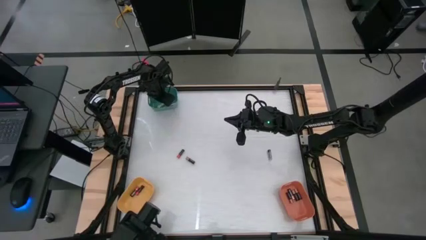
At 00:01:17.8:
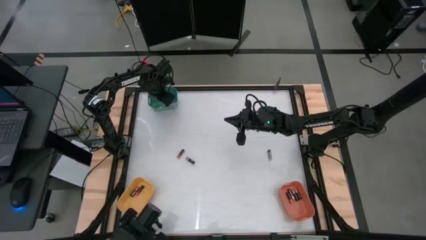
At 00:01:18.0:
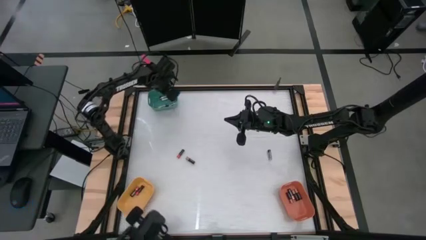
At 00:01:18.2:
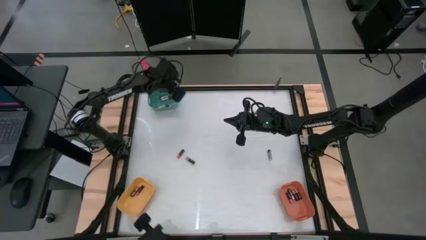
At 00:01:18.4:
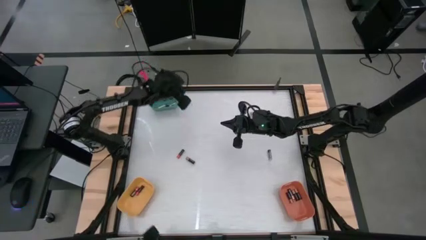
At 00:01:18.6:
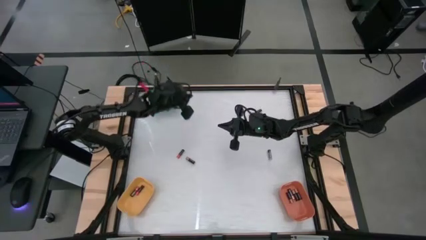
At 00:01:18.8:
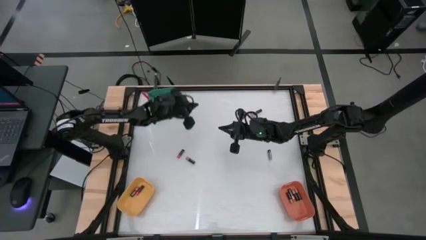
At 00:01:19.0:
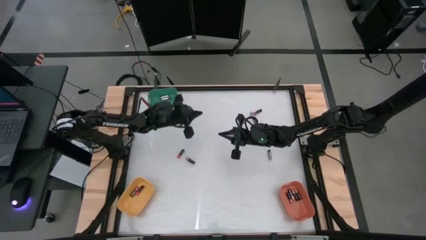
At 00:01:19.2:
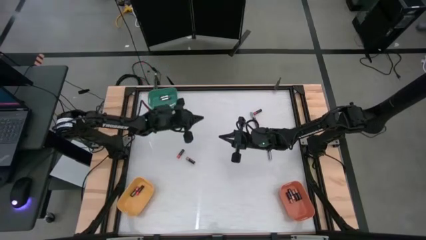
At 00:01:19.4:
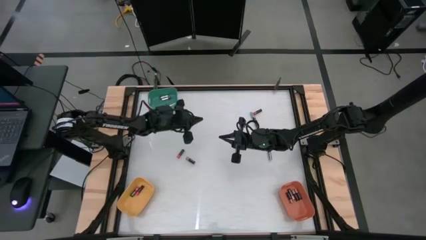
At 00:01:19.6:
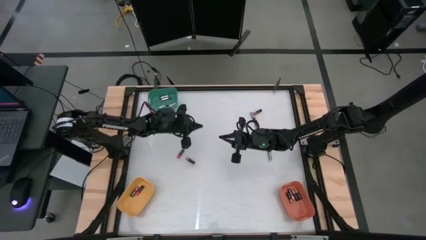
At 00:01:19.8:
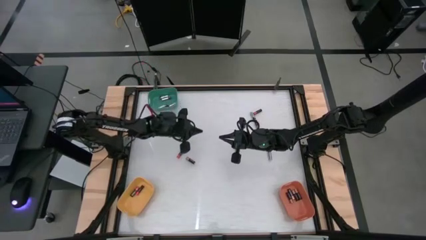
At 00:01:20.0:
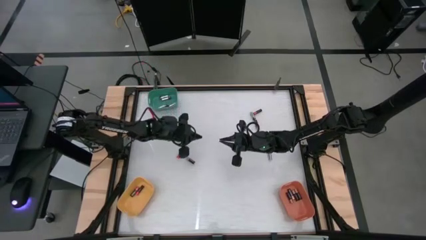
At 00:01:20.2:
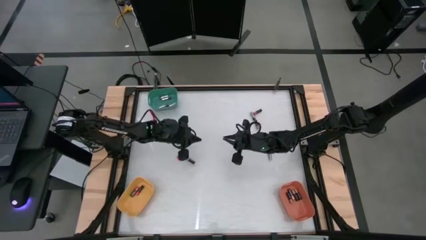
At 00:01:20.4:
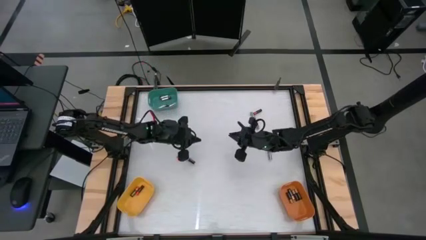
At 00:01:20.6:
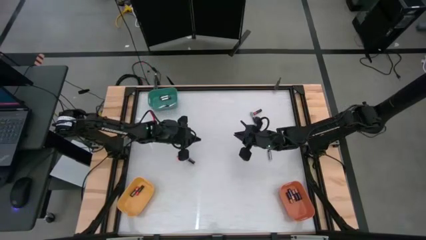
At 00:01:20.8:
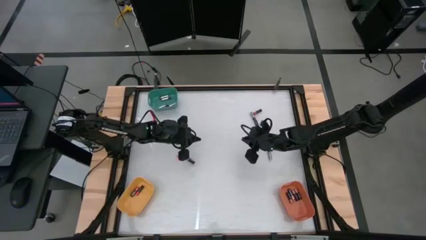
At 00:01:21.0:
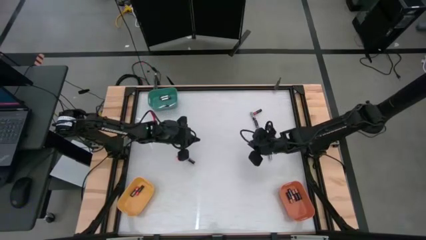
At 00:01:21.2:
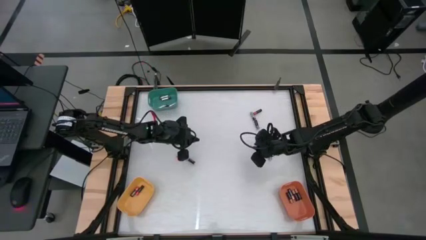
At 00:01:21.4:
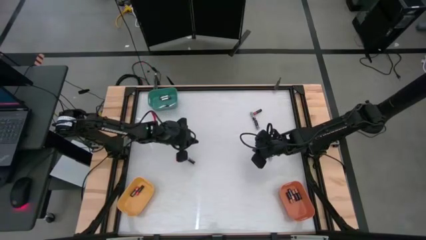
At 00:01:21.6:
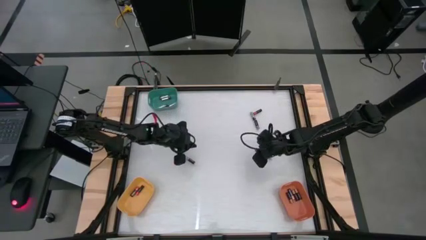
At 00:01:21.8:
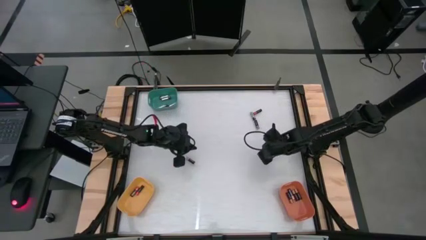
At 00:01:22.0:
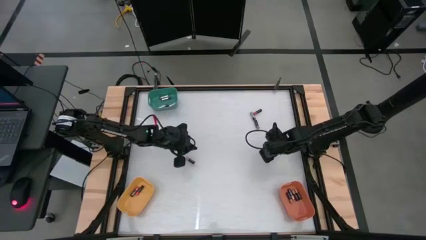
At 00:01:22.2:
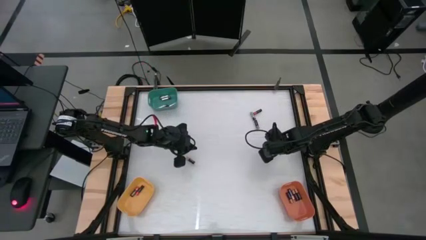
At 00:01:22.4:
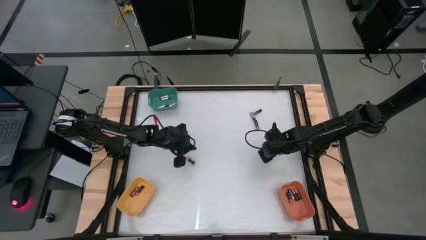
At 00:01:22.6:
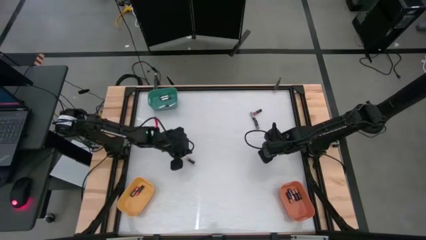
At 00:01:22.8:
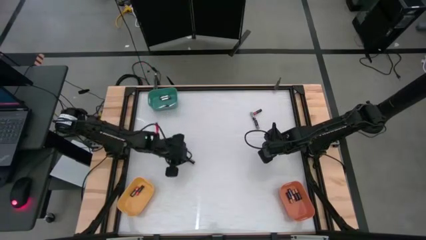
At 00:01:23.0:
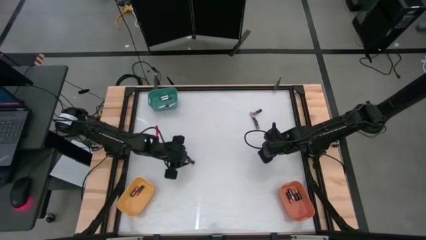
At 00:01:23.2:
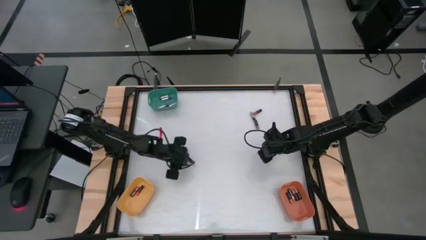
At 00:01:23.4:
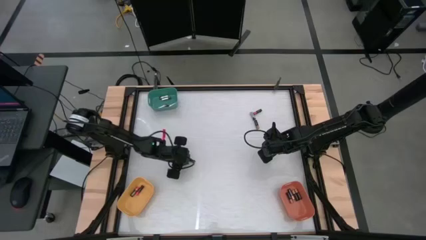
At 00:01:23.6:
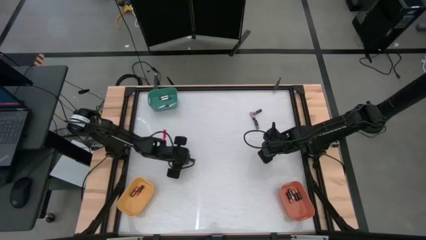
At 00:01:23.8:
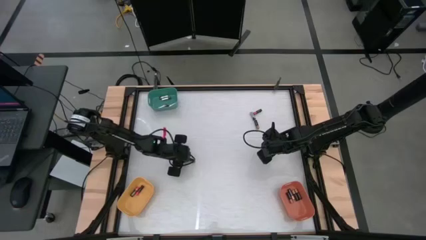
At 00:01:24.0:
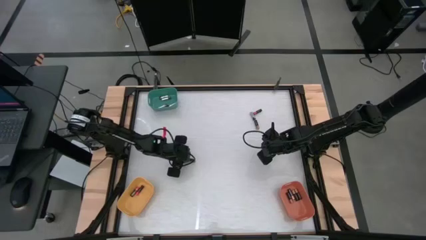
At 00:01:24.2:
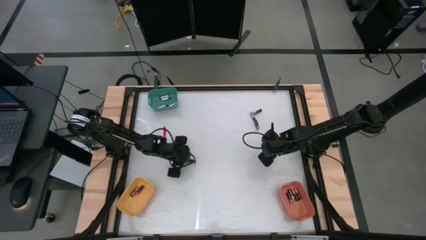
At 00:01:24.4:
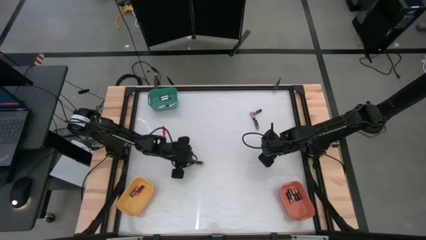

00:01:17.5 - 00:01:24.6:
Task: Sort batteries
Put the middle left golden black battery into the bottom right orange bin

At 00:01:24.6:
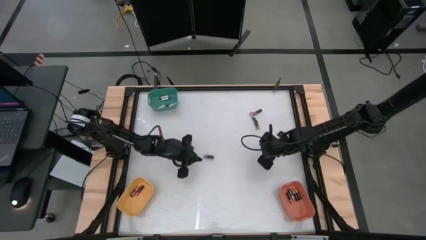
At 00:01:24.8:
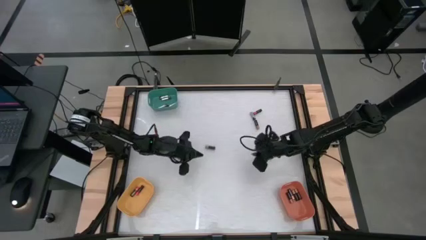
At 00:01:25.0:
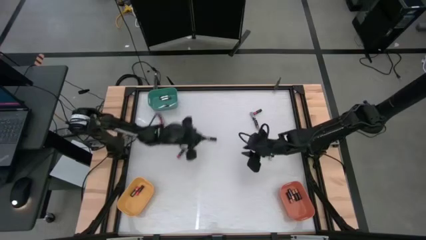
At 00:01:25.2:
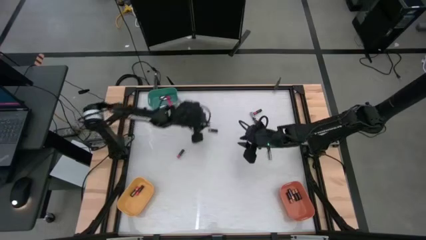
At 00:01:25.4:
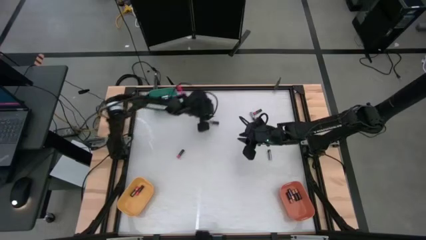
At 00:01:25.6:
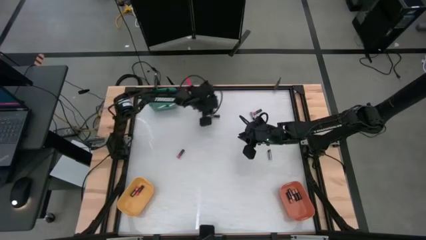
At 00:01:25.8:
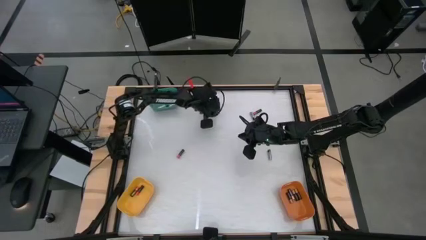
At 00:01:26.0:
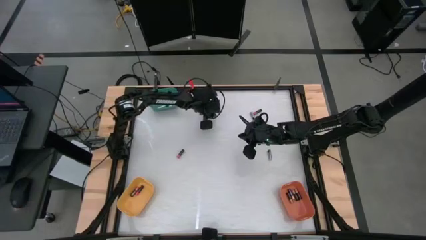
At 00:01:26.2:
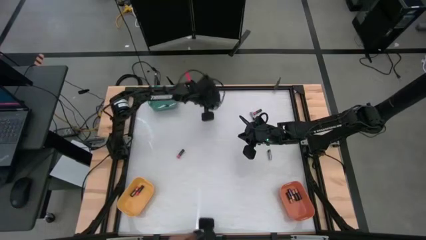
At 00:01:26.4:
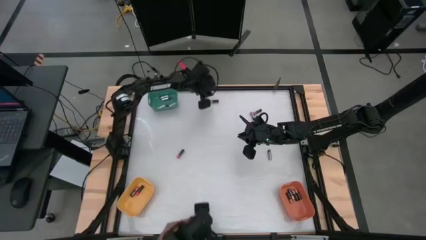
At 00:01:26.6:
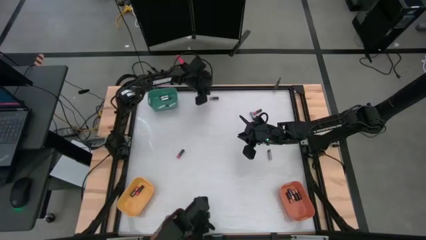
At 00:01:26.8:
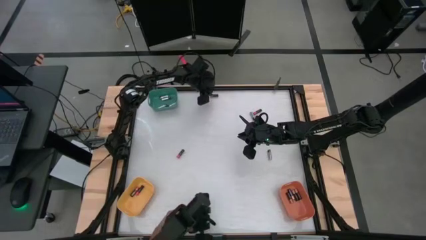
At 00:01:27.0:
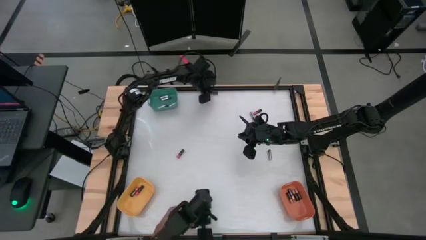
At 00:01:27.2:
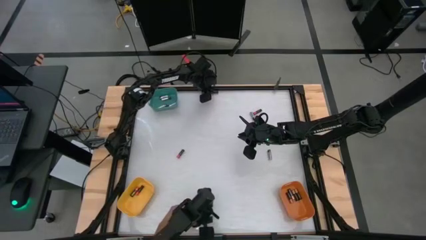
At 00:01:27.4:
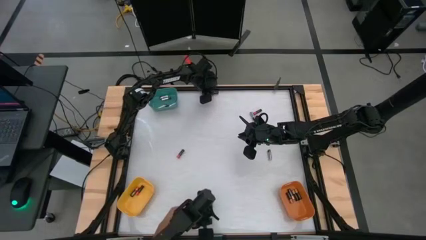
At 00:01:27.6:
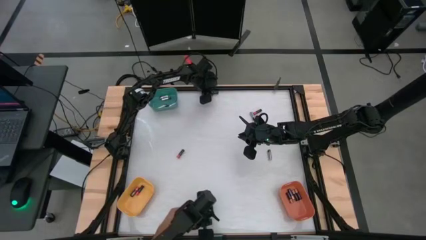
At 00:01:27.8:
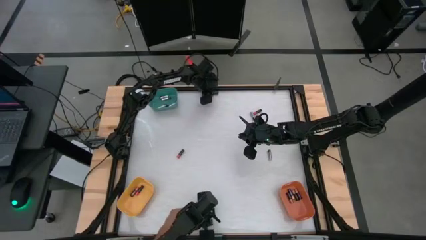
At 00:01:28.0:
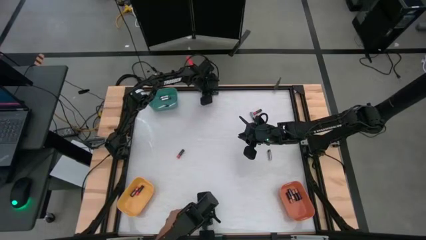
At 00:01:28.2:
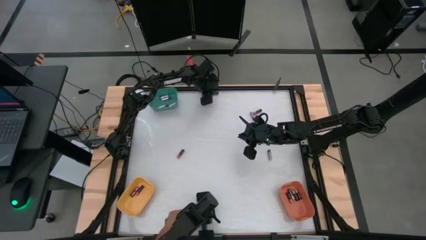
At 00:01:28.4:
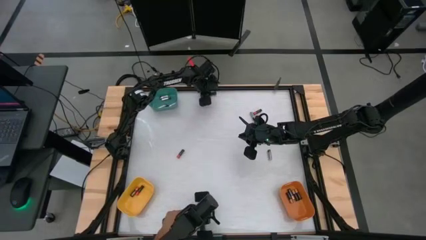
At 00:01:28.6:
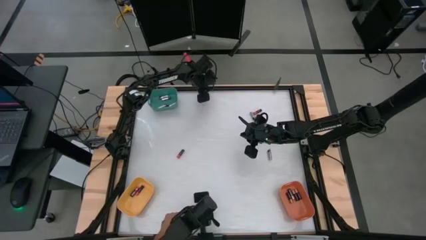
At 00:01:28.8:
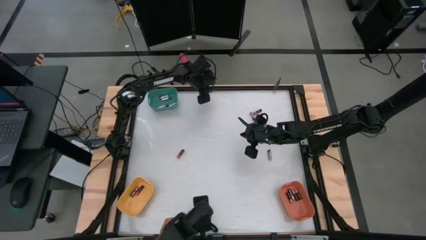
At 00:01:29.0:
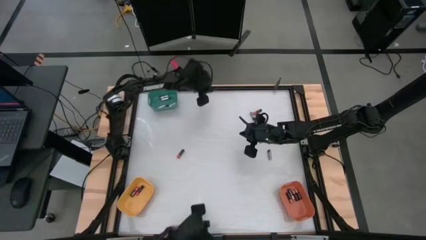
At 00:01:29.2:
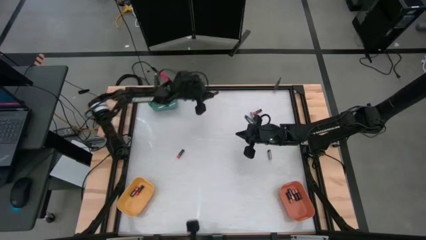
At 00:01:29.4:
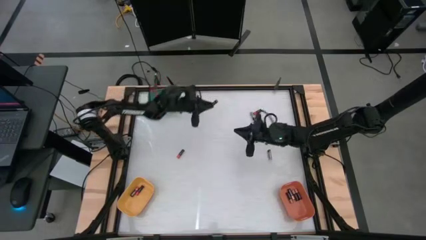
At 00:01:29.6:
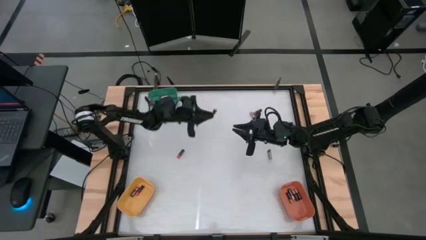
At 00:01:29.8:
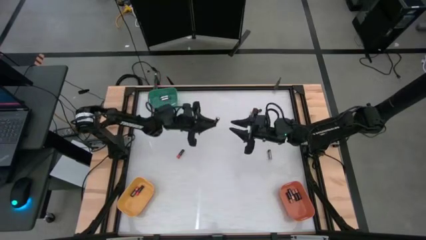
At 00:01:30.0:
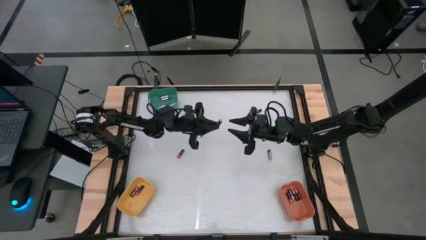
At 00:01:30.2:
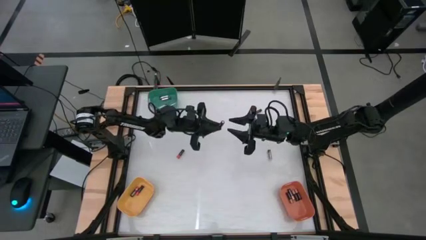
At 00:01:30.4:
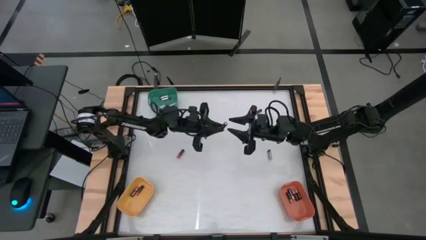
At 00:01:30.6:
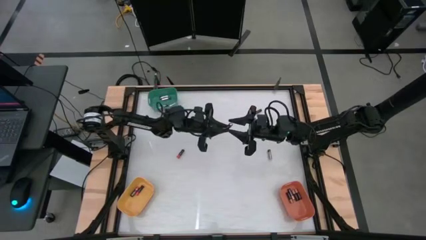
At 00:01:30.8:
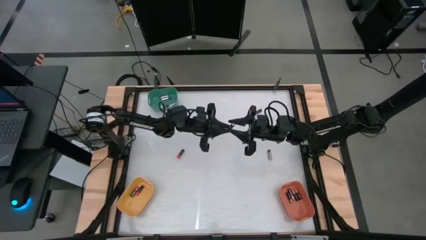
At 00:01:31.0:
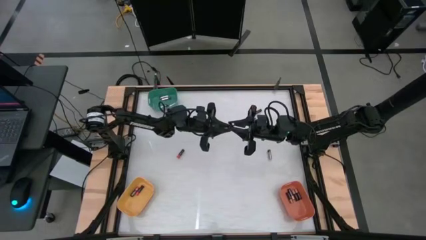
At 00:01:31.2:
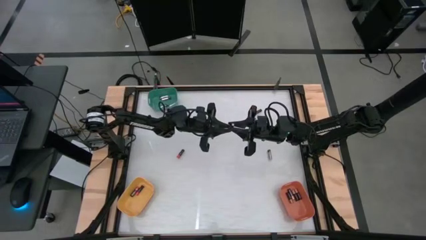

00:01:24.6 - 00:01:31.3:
Put the top left gold battery into the orange bin

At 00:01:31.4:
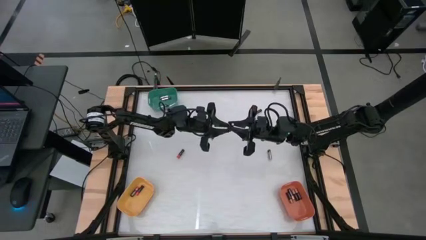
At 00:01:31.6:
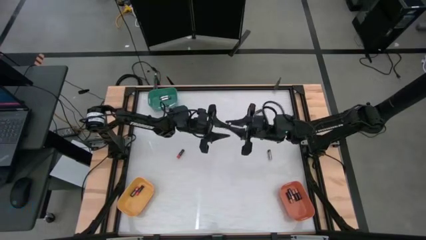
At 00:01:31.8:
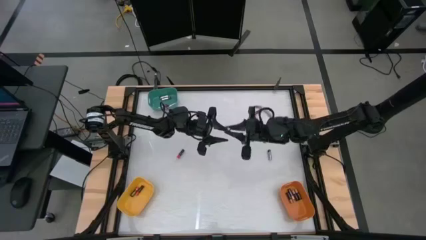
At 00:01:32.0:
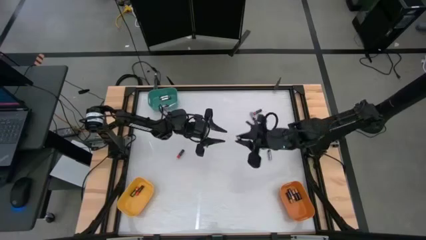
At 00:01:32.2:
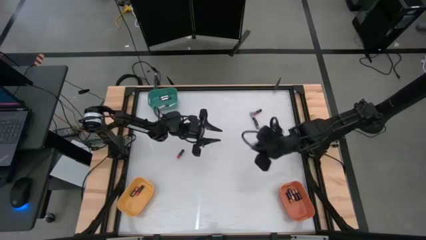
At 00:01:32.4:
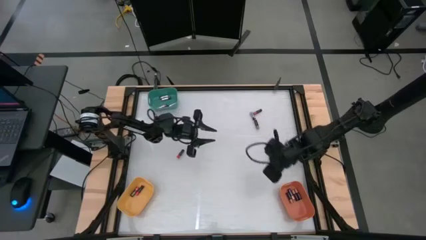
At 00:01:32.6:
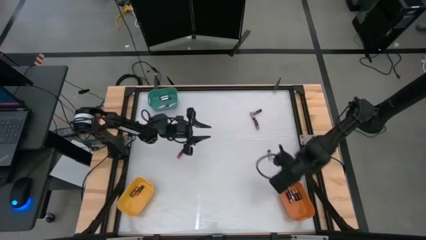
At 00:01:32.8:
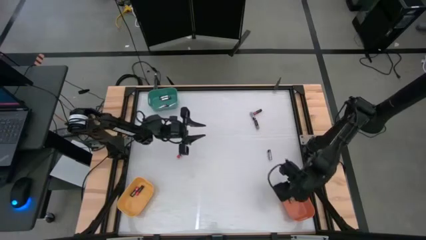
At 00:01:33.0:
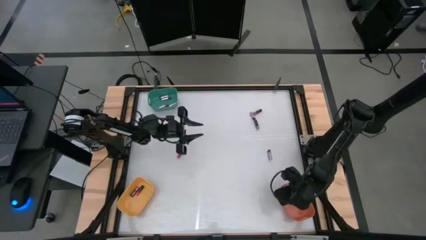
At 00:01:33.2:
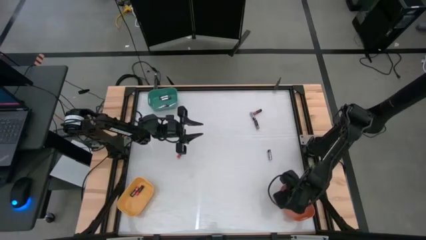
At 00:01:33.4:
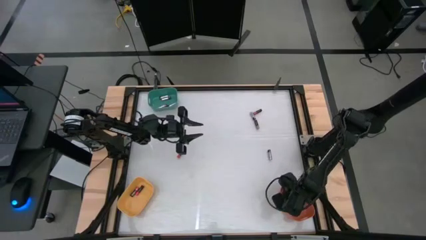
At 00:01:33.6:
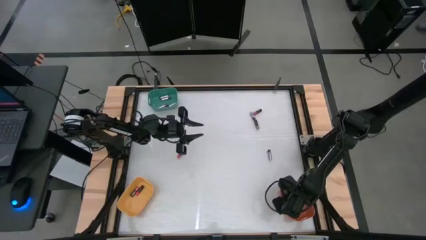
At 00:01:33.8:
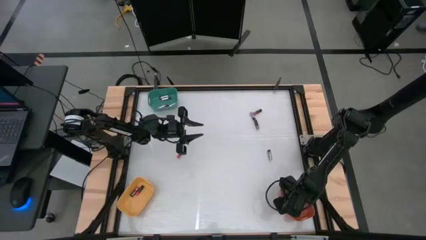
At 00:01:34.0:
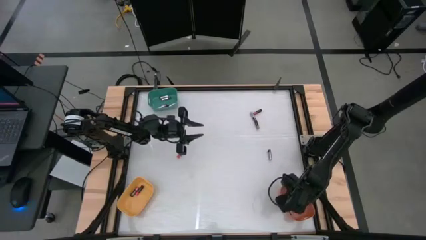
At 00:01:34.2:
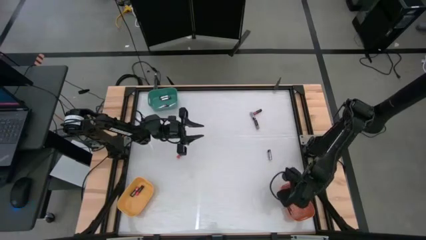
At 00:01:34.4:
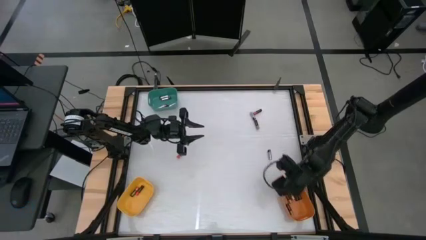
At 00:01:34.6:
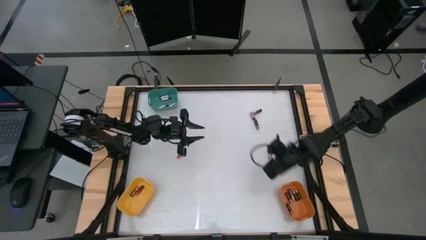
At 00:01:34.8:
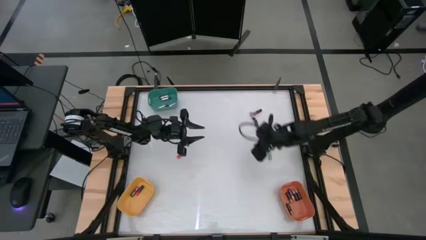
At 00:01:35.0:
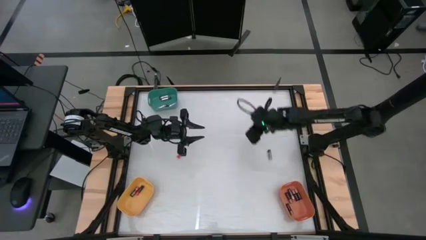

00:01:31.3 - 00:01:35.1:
Put the top red battery into the yellow bin
